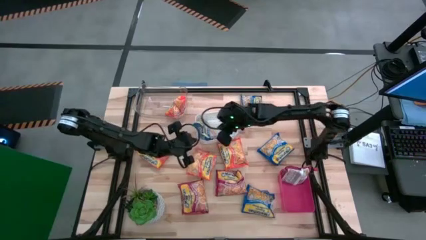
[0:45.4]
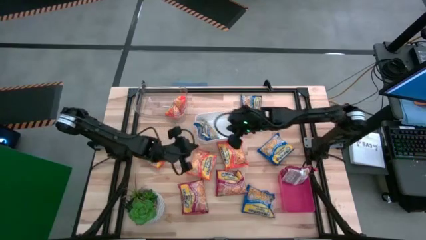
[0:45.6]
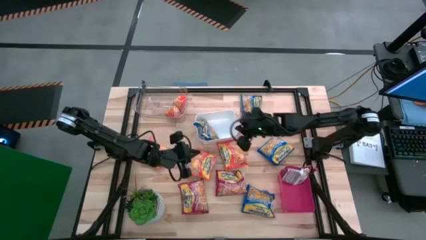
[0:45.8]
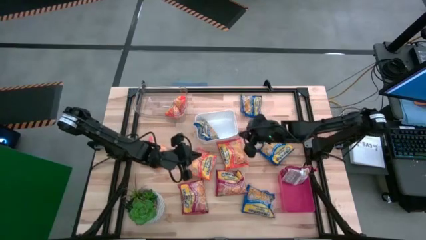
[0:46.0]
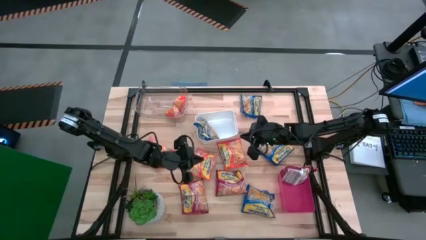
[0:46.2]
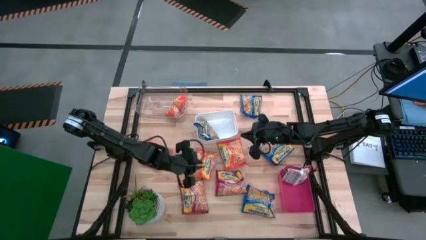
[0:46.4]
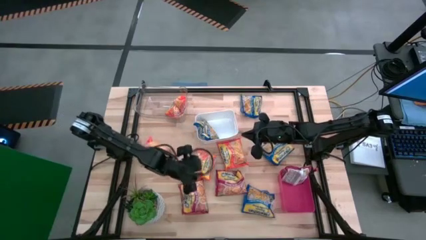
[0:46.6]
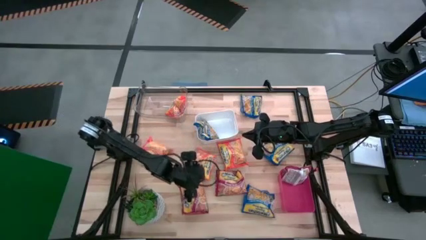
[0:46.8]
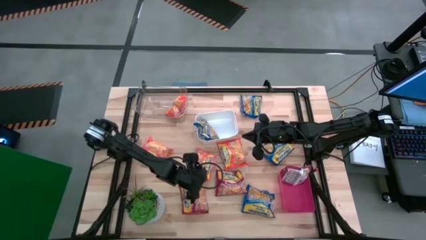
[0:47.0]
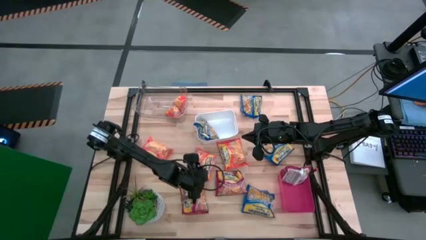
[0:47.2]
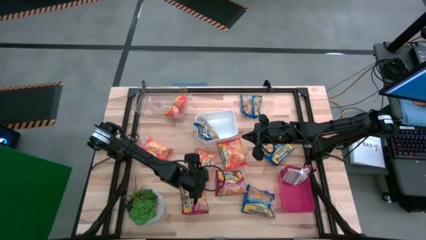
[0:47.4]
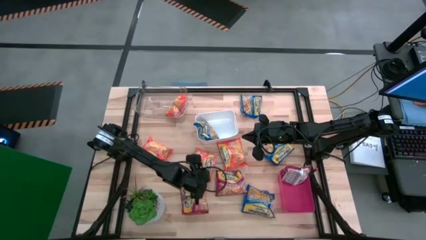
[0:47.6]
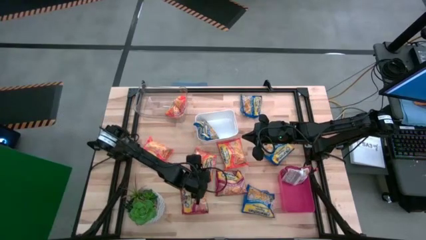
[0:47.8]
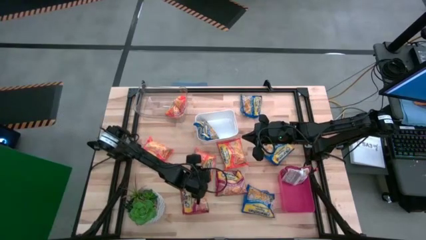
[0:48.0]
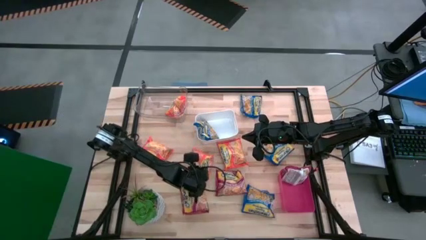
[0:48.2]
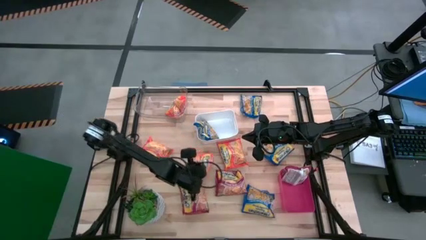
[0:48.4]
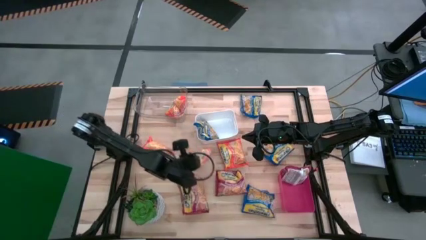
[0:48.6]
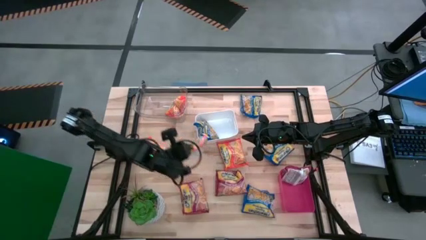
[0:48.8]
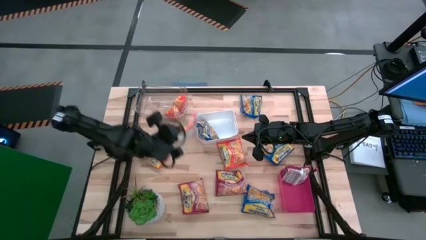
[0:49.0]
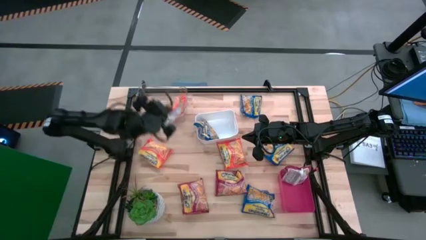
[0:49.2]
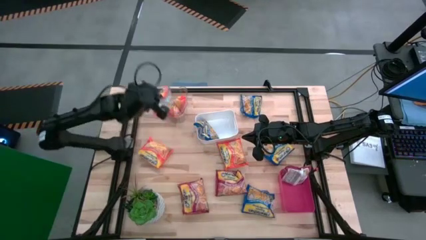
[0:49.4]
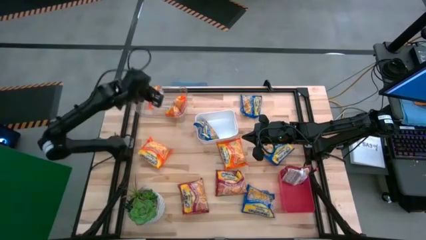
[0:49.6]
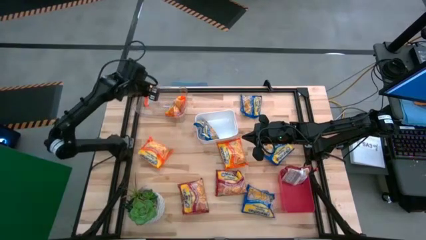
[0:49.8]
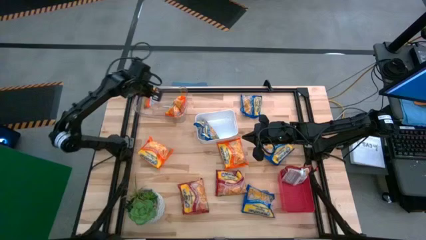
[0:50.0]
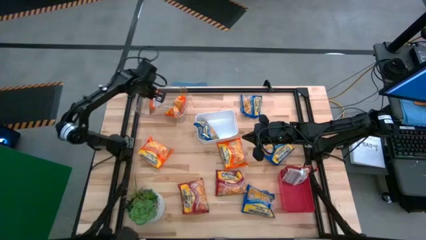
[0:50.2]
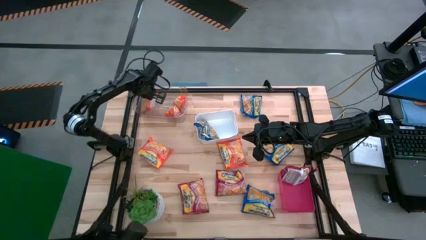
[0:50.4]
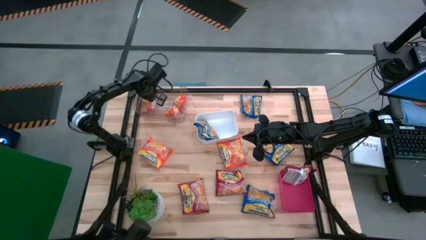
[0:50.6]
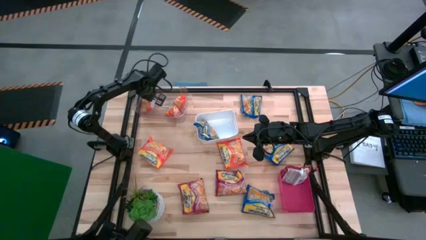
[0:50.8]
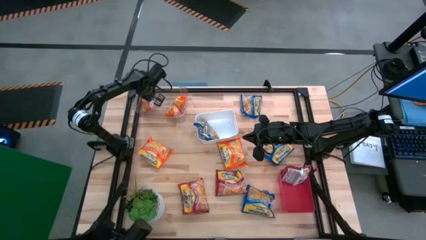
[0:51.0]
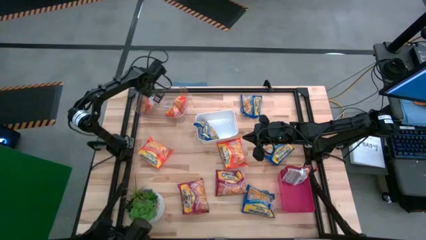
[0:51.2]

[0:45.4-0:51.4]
Task: Sort Maruchan noodles
Put the orange noodle pack into the transparent bin

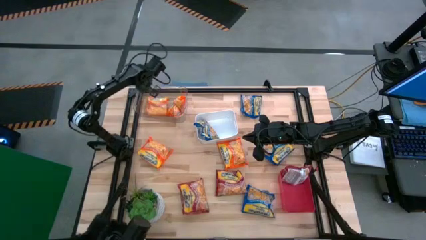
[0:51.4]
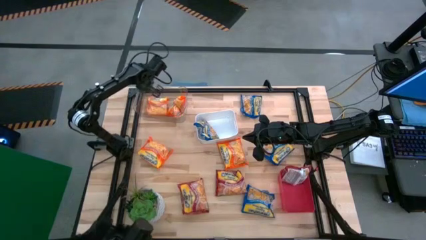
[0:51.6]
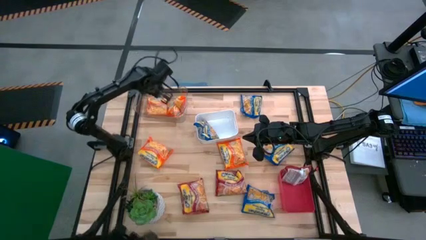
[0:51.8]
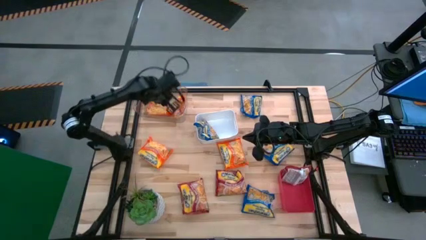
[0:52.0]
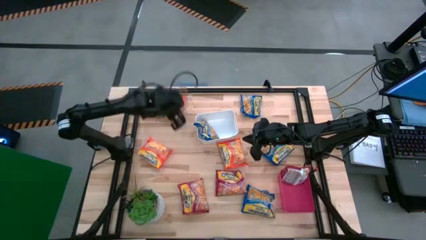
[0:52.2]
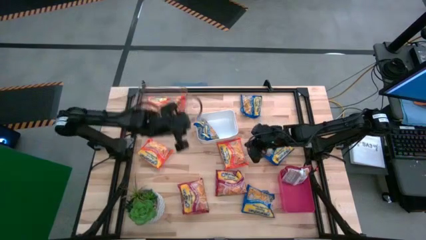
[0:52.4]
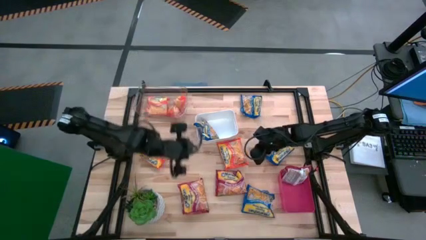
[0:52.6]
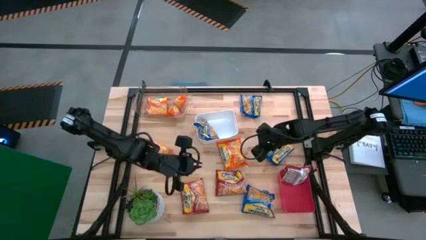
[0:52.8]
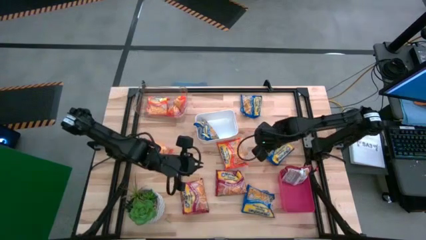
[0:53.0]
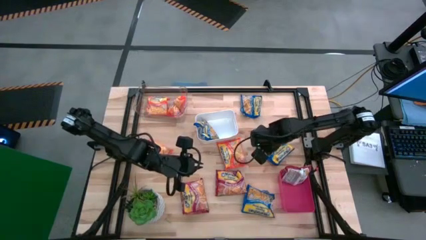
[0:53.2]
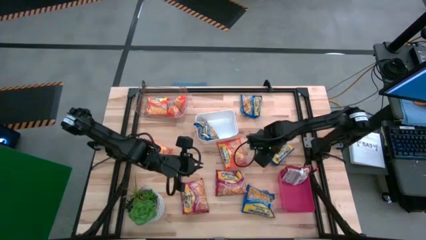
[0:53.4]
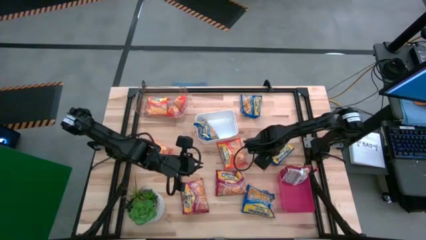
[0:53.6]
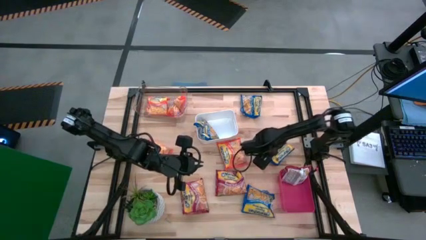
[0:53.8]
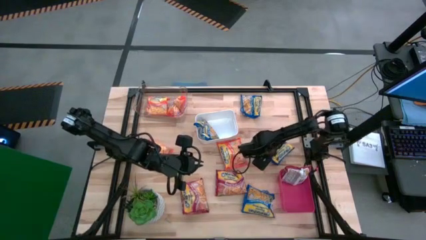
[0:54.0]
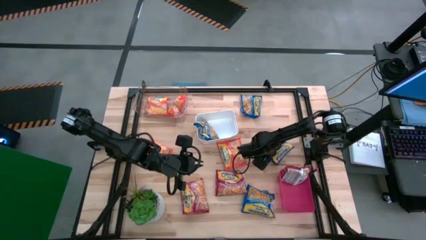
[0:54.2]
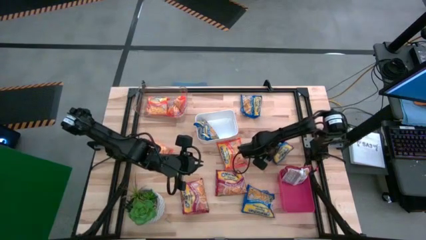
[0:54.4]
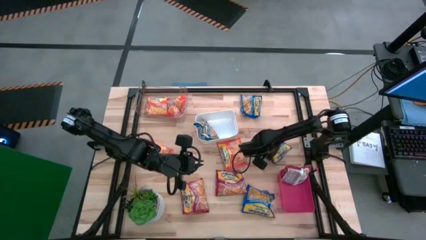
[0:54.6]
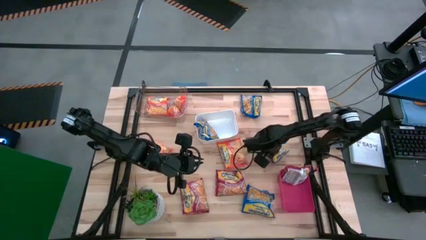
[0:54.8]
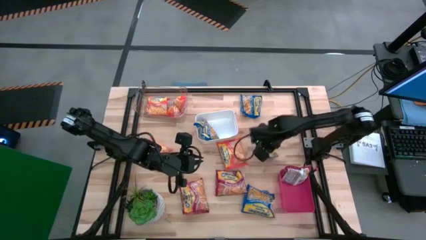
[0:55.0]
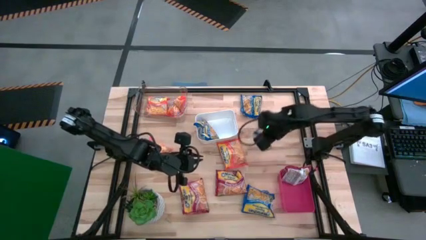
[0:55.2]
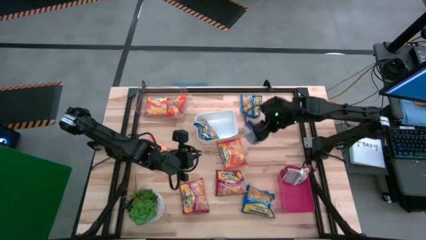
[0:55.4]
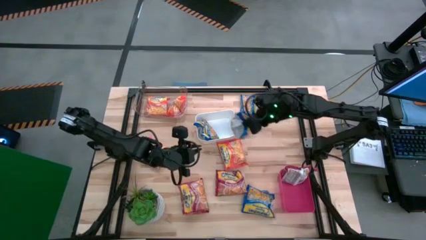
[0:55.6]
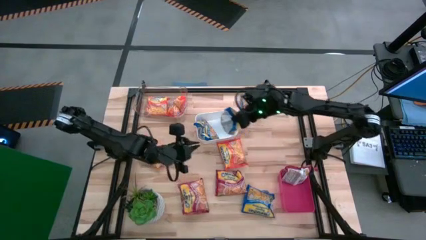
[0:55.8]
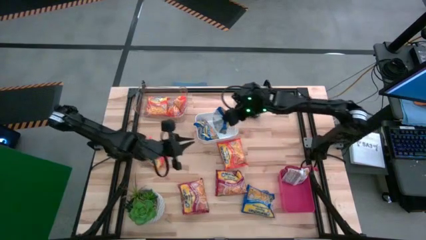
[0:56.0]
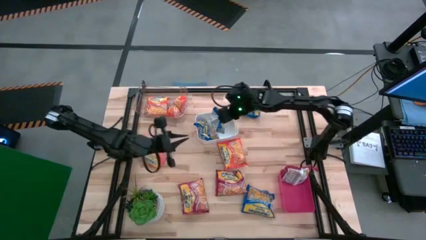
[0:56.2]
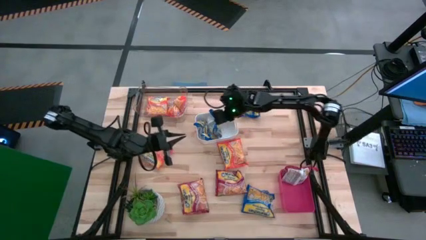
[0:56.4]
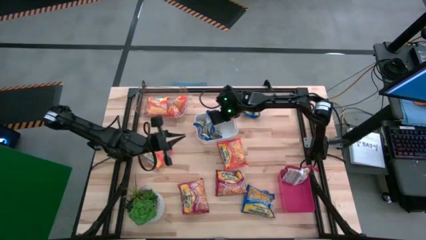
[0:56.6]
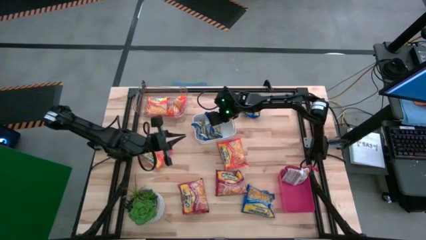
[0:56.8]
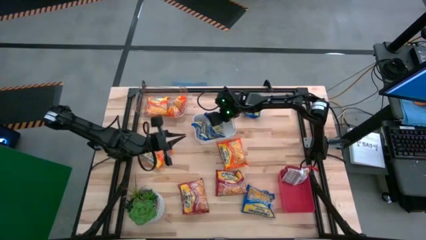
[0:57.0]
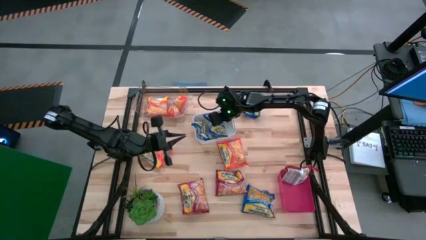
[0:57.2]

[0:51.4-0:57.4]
Put the blue noodle pack into the white bin

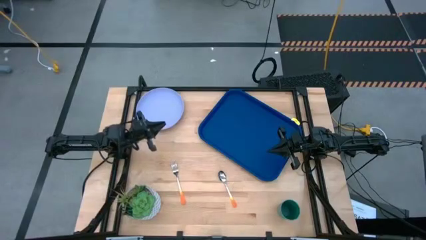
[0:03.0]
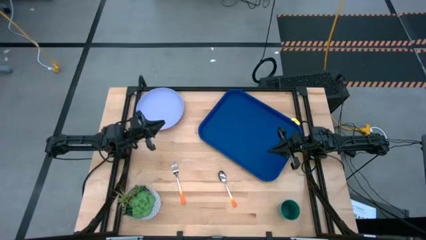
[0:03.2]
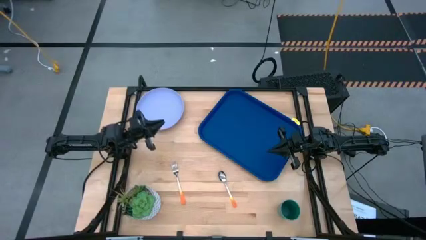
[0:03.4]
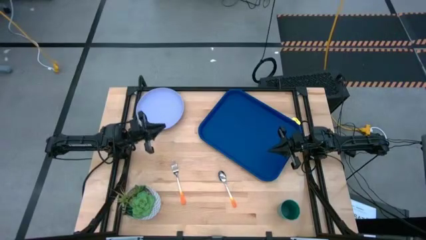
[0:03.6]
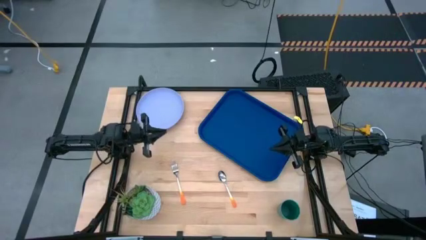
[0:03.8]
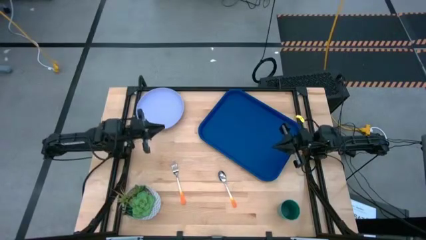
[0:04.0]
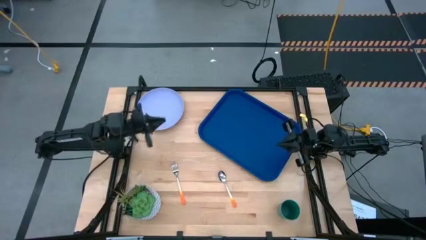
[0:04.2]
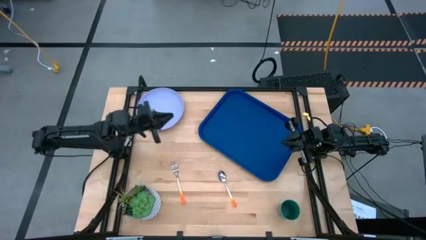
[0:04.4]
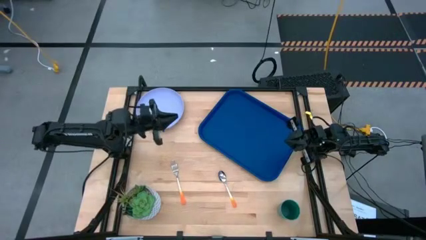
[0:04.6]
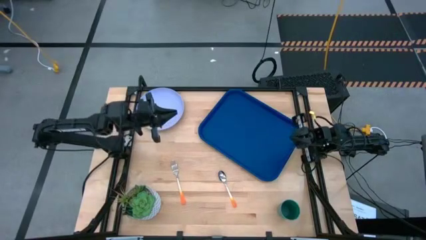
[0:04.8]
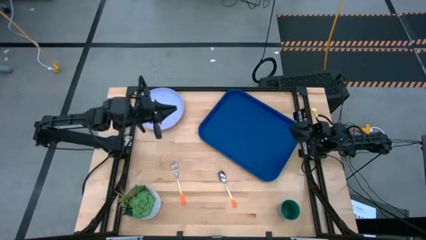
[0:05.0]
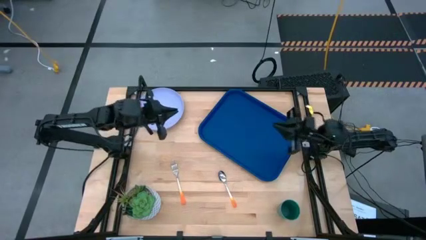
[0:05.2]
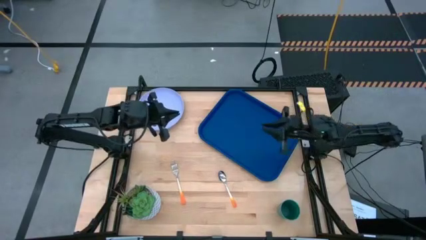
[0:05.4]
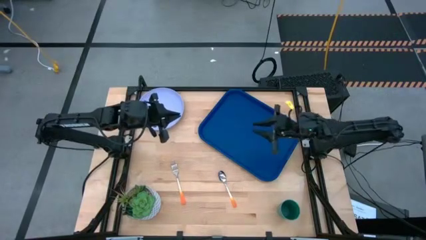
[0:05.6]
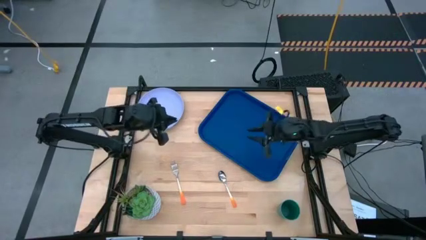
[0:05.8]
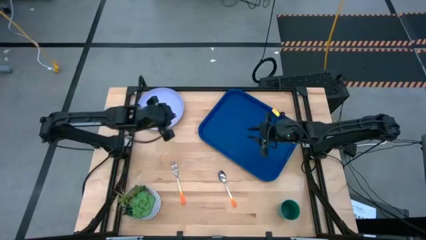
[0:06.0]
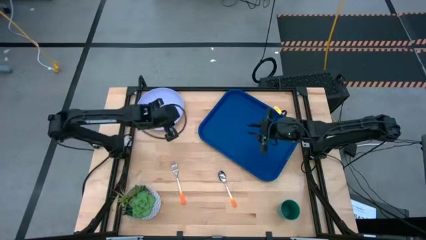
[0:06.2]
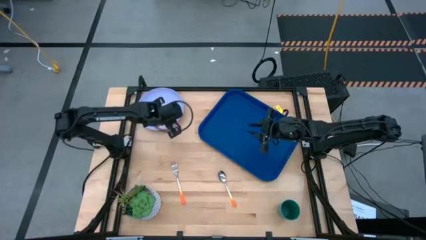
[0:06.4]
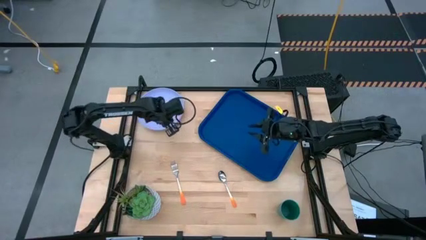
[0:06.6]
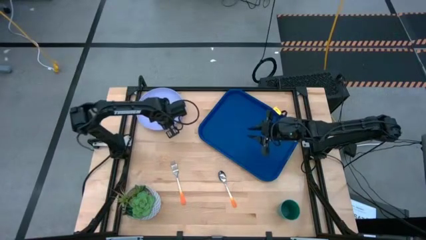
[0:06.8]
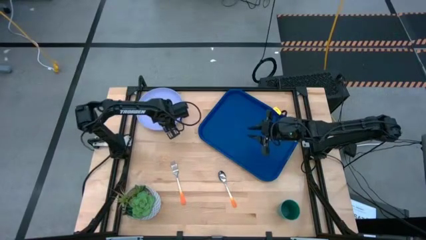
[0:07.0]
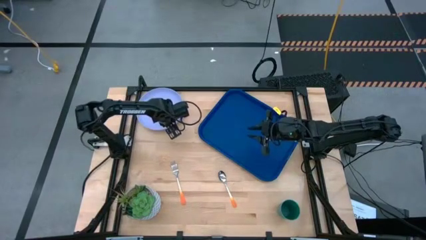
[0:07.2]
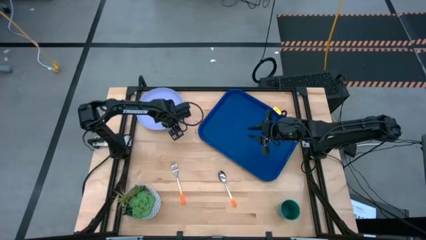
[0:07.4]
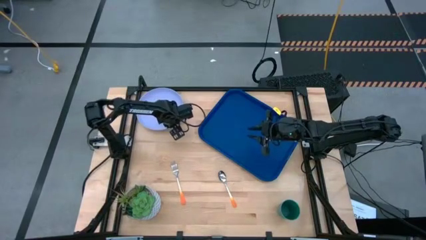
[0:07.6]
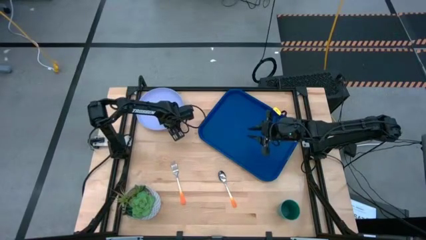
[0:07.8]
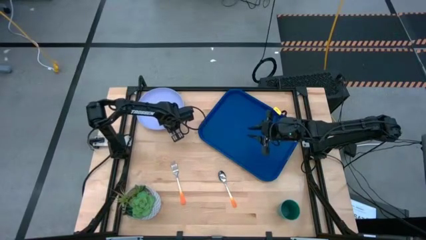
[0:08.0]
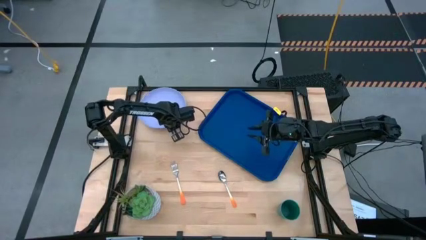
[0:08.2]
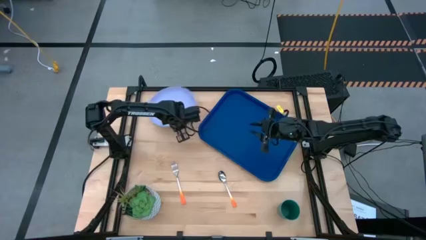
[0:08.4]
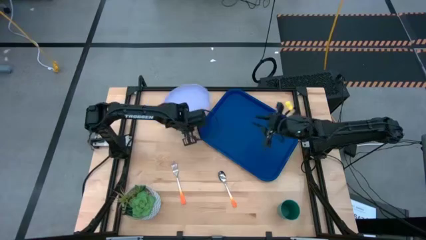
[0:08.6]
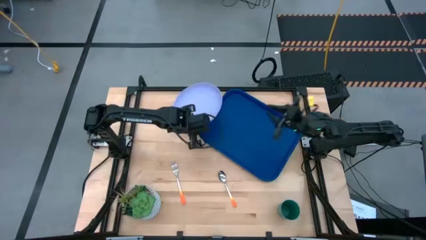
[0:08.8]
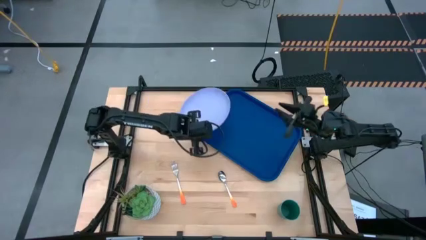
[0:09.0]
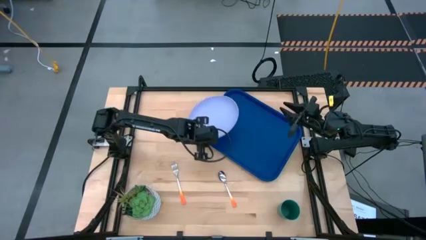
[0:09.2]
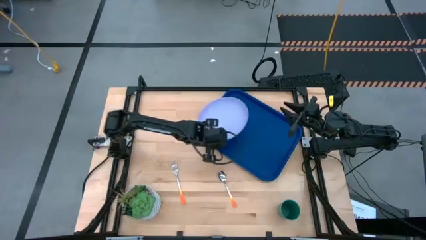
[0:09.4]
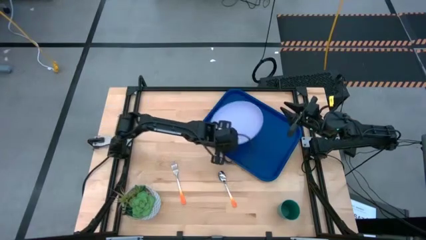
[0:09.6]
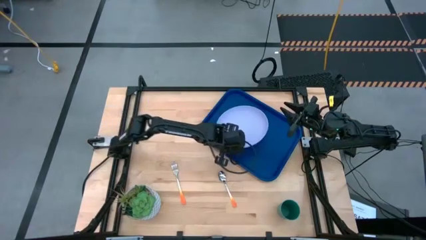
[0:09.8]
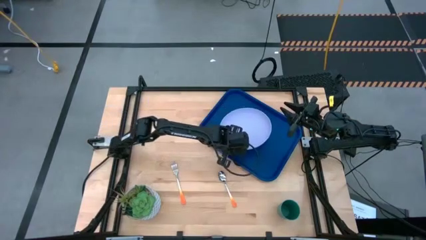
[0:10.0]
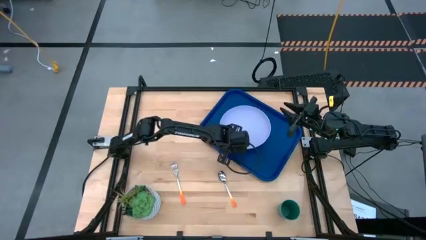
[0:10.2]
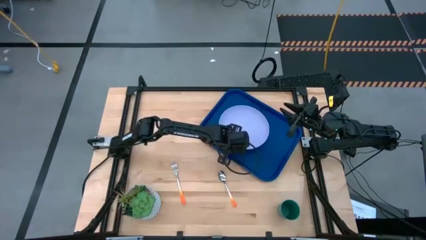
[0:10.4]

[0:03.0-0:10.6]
Task: Pick and place plate/cup/fork/spoon on tray
Put the blue plate on the blue serving tray
